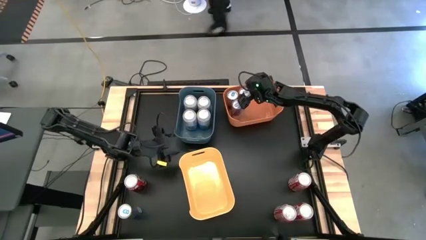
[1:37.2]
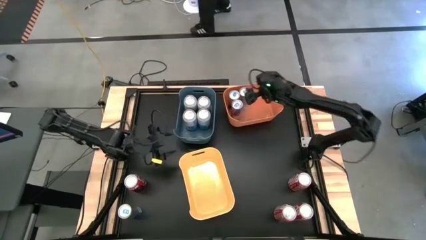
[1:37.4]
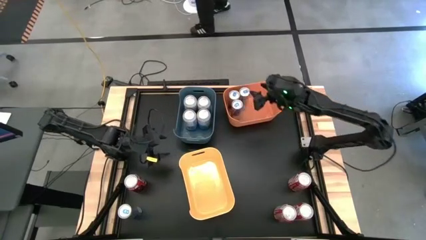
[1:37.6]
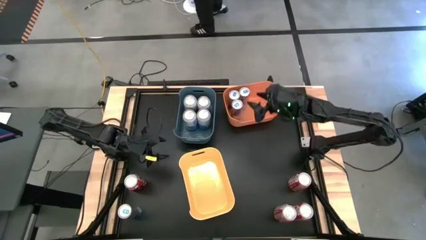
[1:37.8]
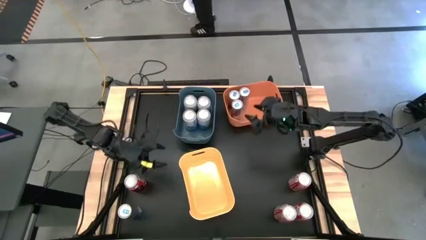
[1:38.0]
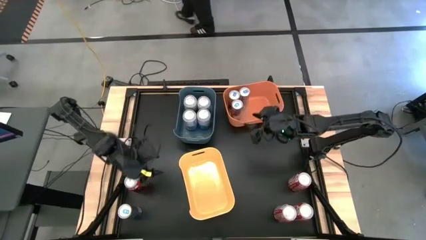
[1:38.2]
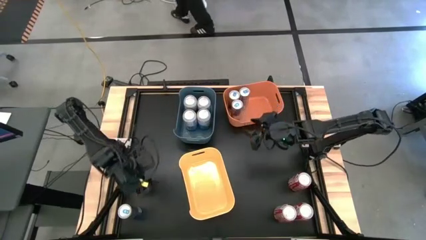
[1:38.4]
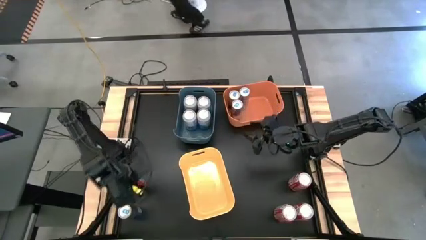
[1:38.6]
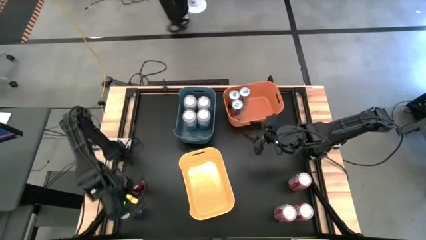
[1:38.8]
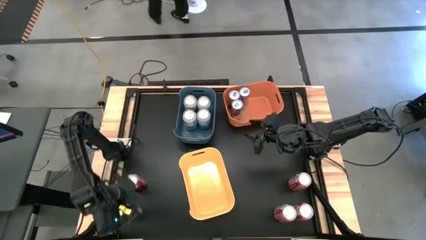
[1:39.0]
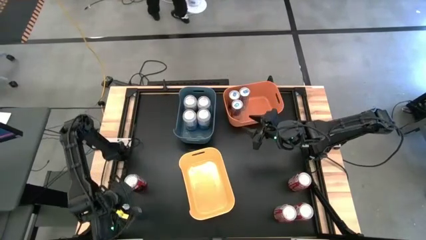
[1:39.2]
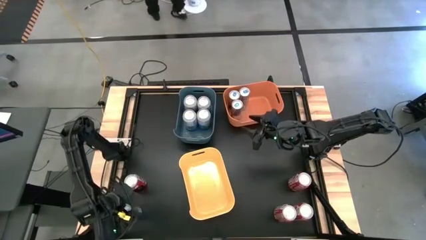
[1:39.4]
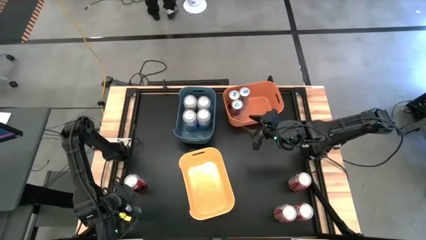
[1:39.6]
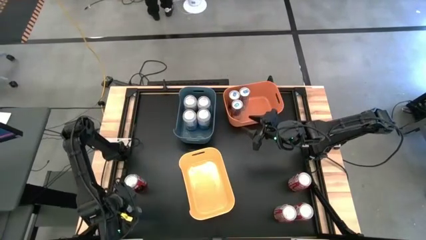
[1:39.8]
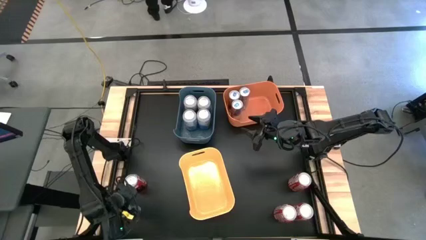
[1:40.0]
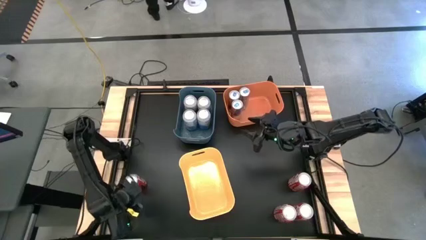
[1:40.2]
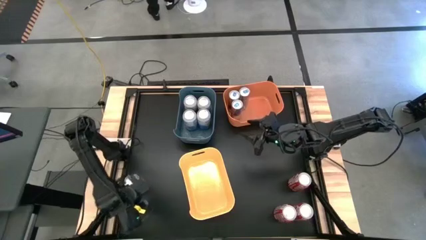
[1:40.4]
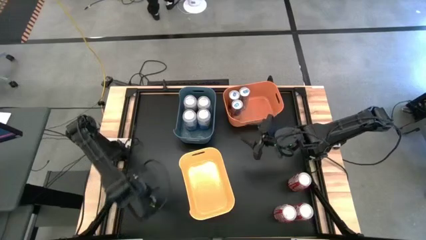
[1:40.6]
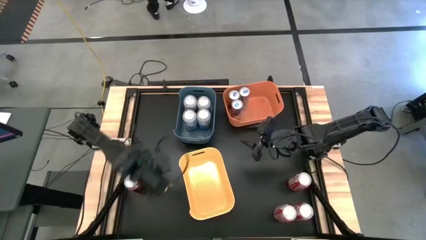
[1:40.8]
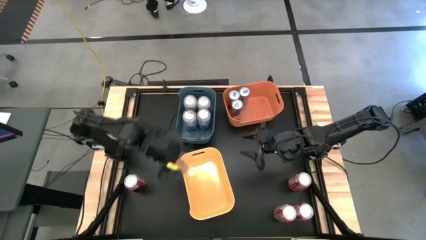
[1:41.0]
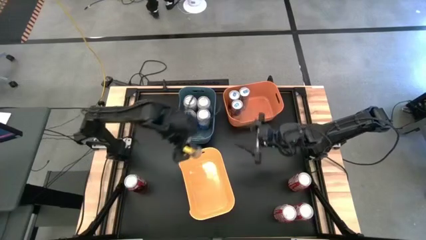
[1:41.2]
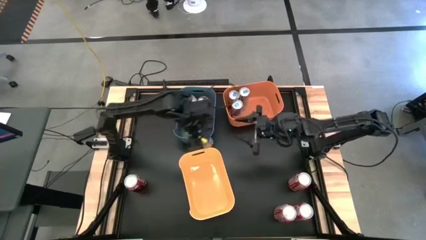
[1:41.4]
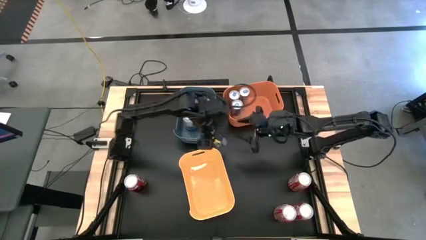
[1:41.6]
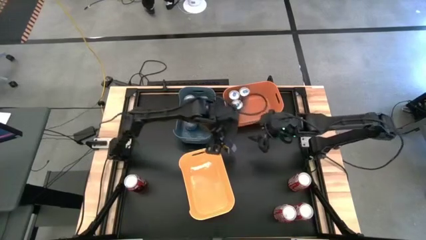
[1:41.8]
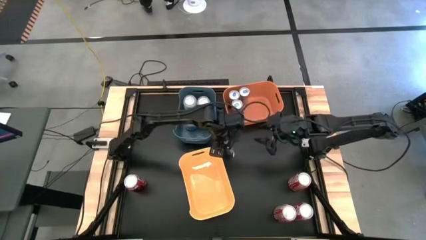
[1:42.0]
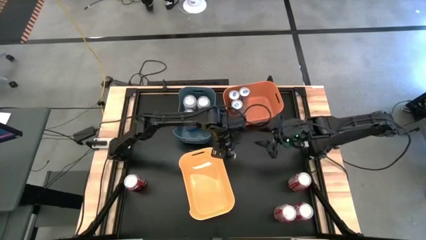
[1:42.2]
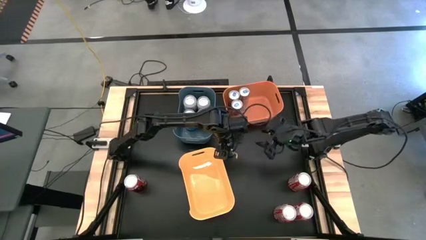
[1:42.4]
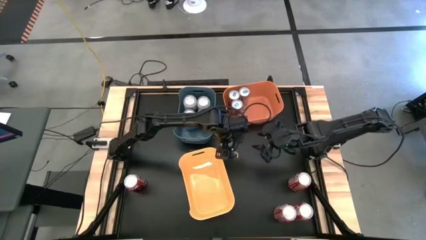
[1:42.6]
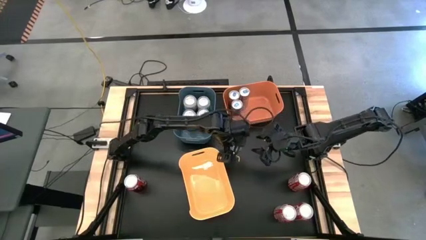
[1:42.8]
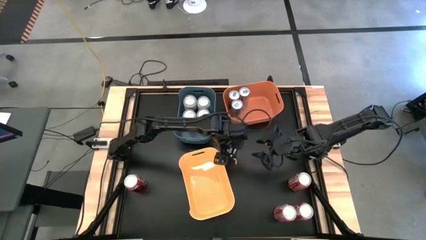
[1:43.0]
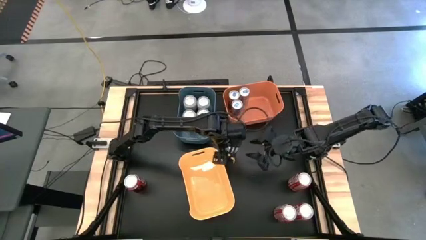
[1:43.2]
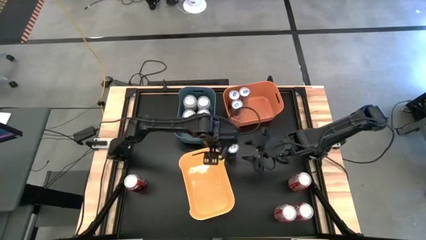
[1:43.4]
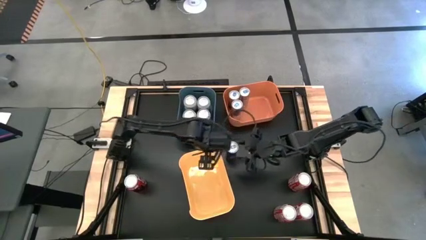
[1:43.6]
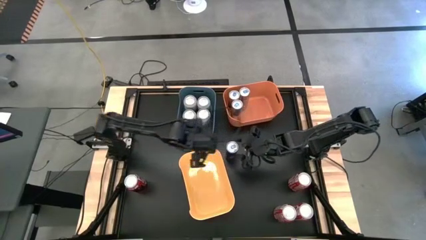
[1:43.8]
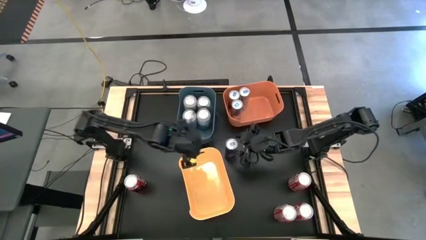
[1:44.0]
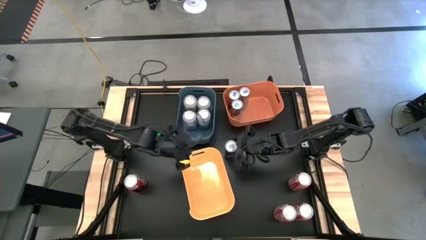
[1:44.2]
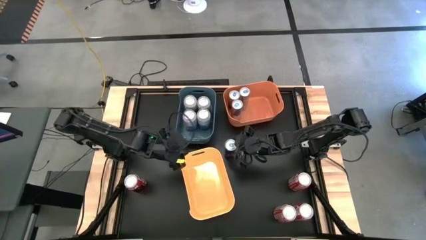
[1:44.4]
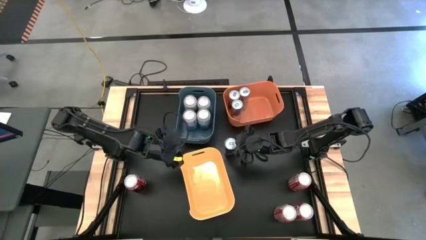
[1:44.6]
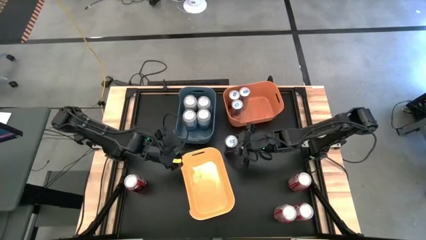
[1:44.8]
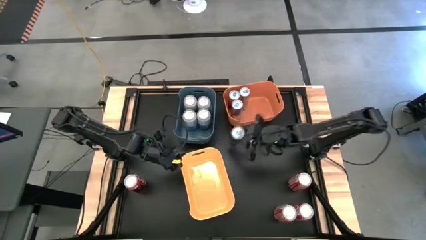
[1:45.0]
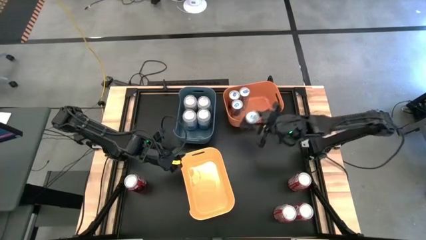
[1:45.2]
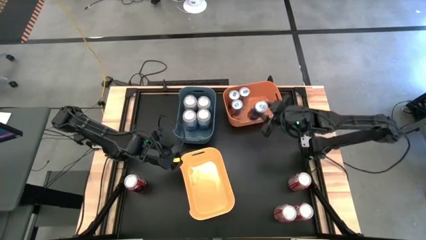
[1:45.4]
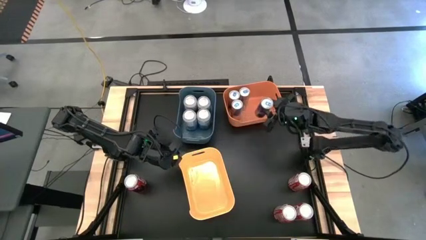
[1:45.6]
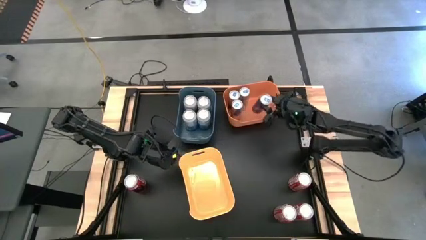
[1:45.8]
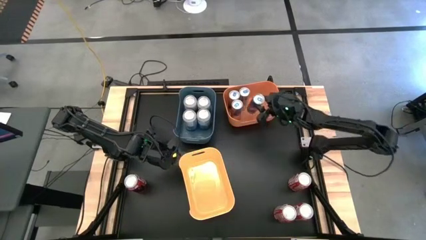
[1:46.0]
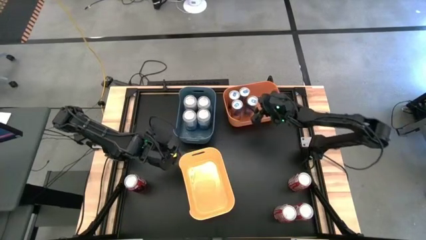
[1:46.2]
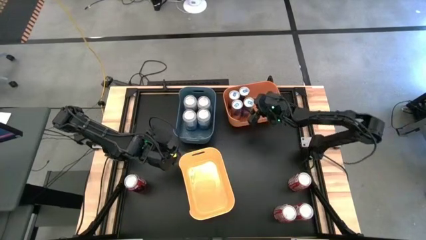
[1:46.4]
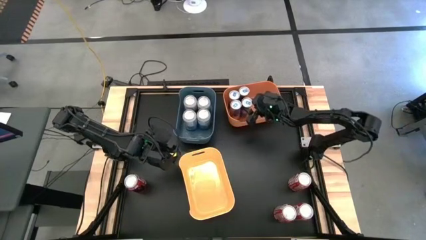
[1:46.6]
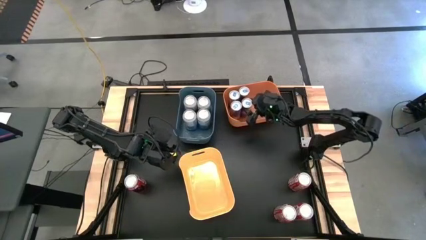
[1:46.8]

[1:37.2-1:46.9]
Task: Sort soda cans
Put the blue soda can into the orange bin

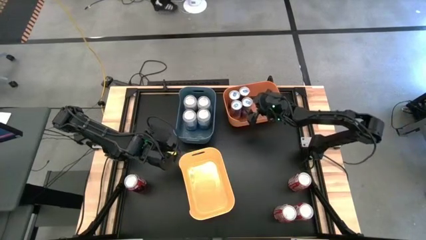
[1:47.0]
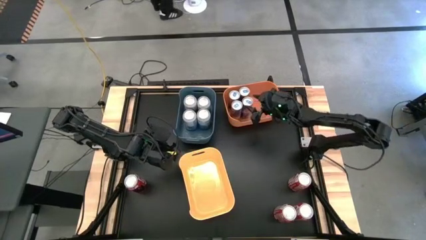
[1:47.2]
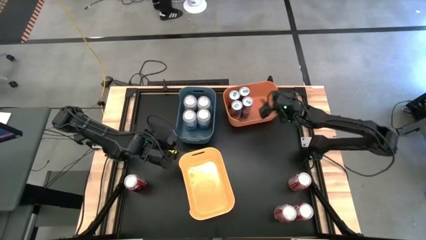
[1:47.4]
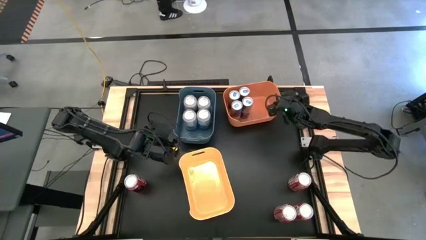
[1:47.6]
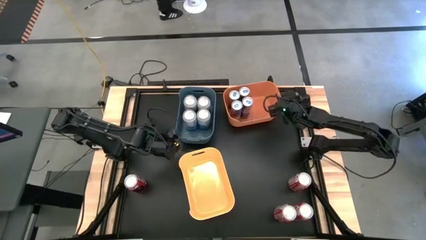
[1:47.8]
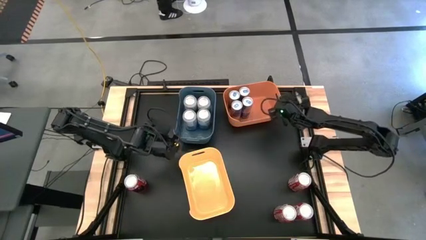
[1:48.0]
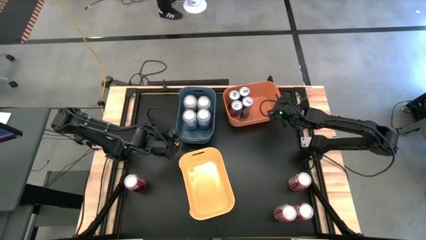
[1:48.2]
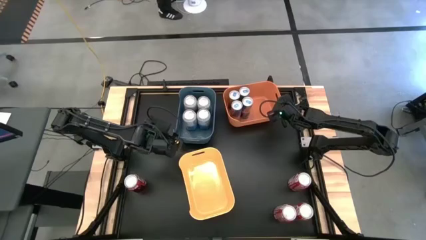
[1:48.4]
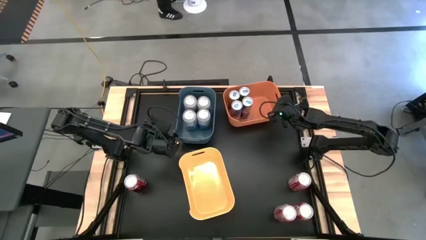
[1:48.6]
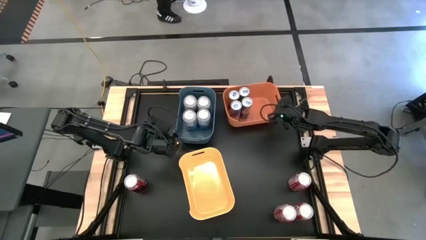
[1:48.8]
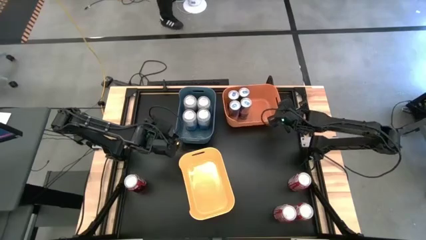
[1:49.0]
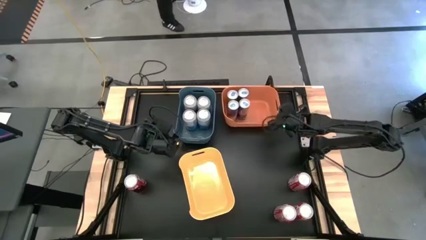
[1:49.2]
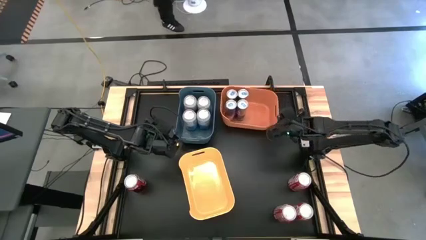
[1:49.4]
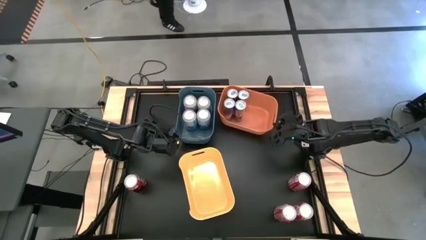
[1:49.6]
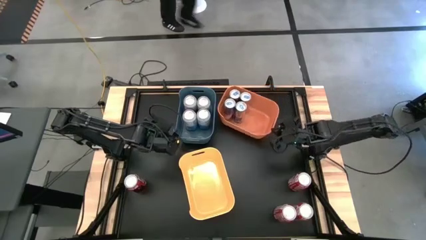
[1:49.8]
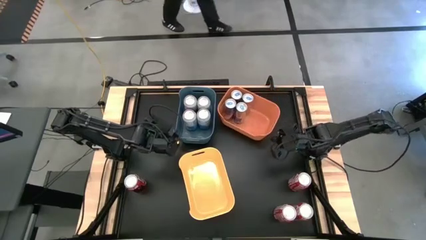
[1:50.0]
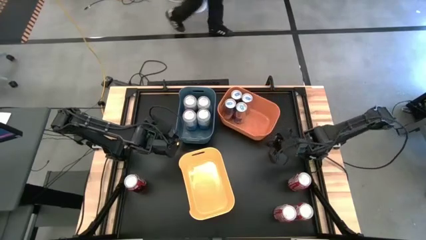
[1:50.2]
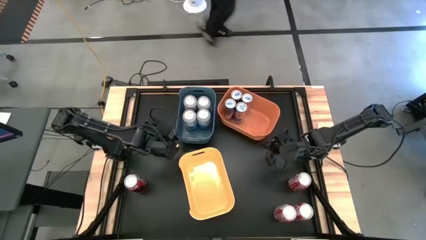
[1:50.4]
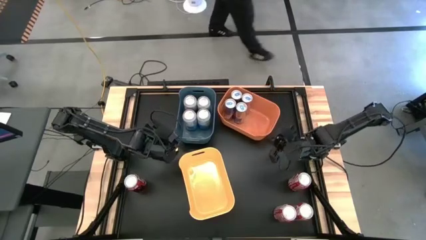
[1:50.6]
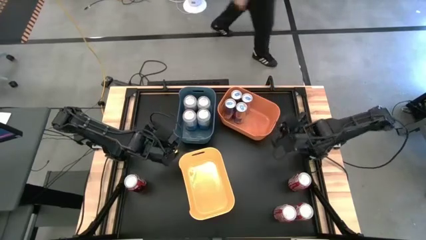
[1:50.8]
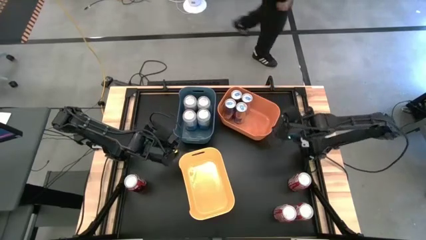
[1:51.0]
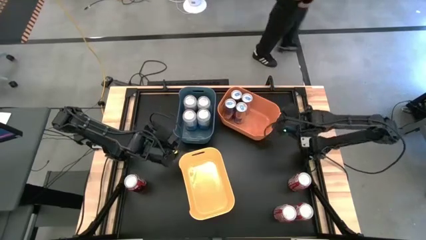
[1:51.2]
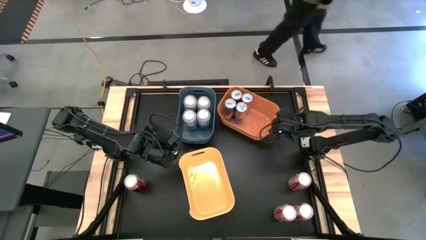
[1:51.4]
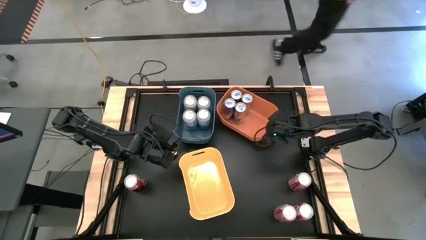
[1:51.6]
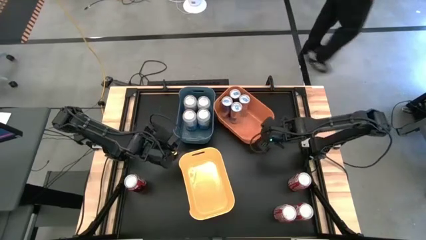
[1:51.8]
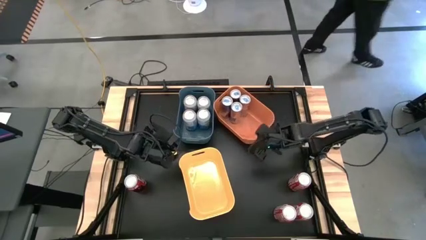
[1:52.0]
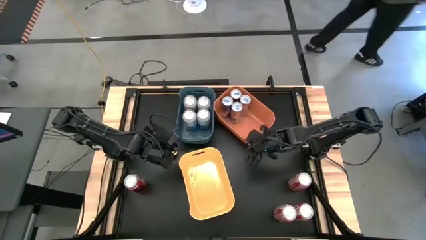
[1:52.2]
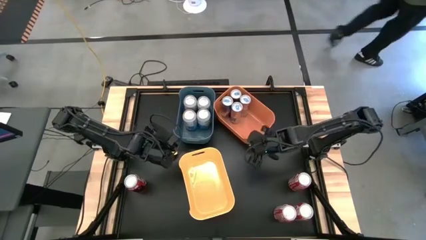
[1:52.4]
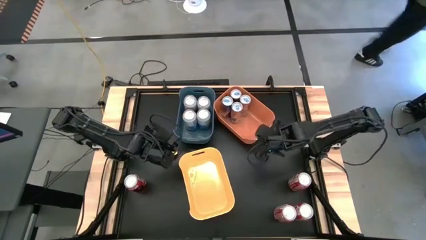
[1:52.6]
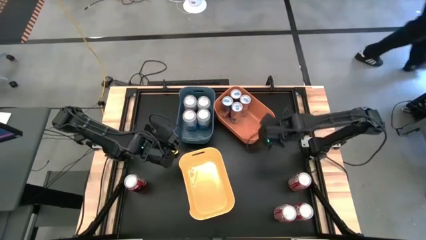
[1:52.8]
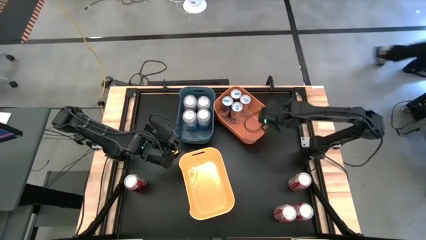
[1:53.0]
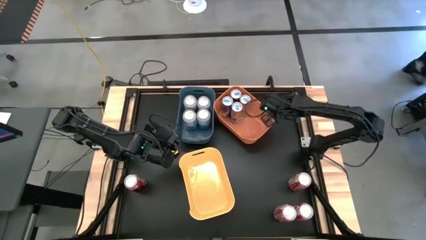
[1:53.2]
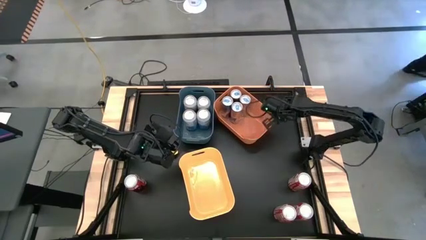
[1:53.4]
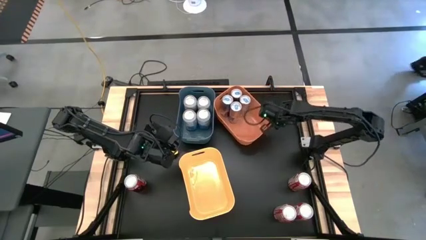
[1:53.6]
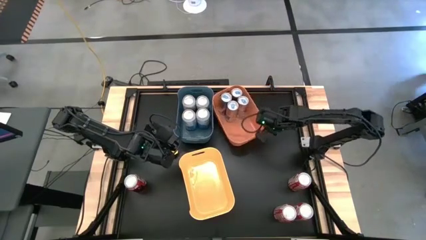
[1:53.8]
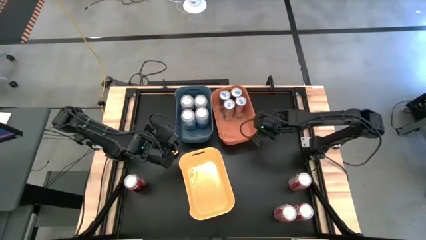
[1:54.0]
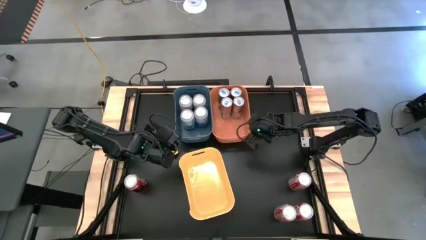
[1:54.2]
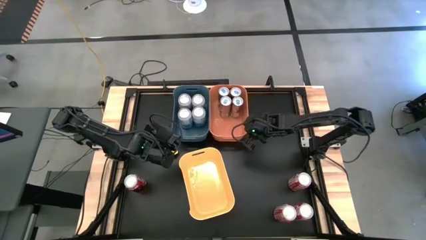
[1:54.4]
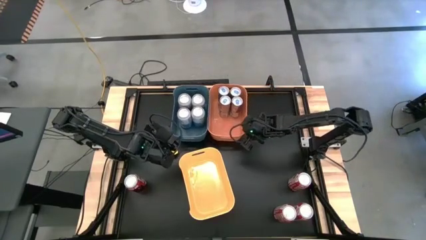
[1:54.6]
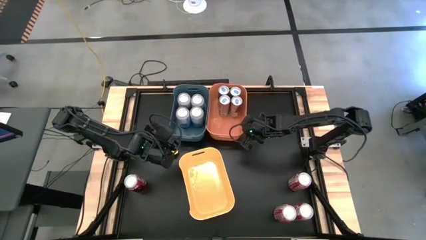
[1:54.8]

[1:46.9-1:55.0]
Adjust the orange bin on the table
